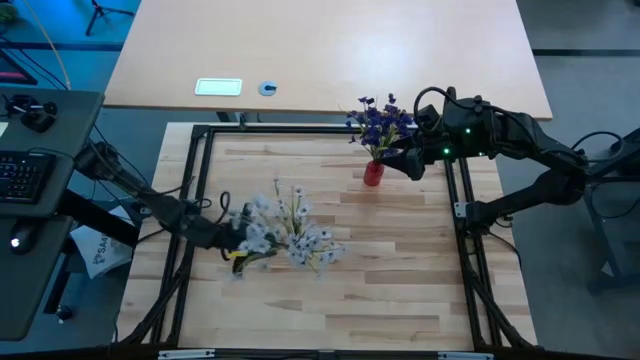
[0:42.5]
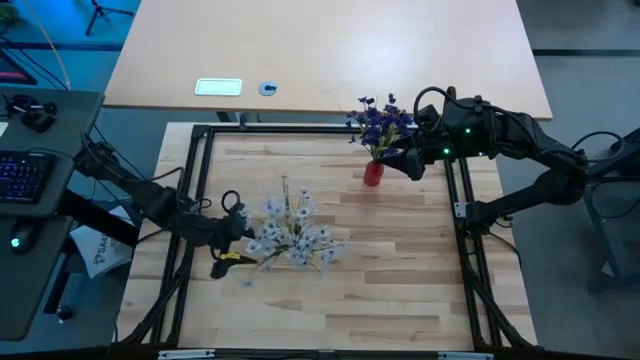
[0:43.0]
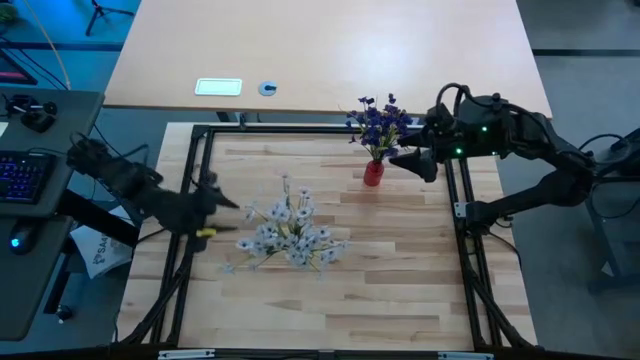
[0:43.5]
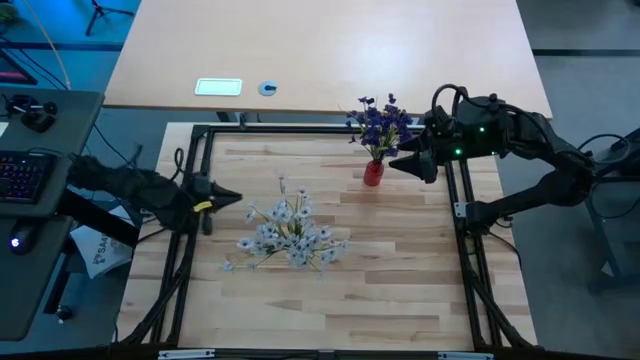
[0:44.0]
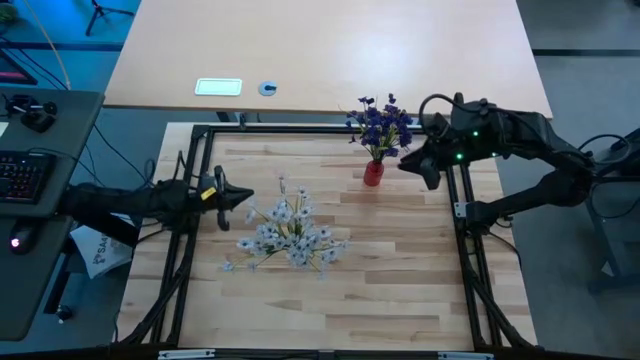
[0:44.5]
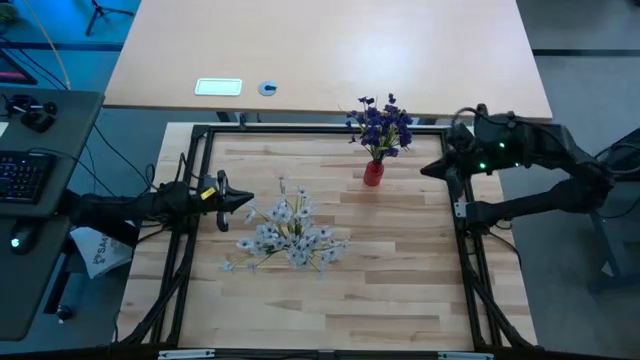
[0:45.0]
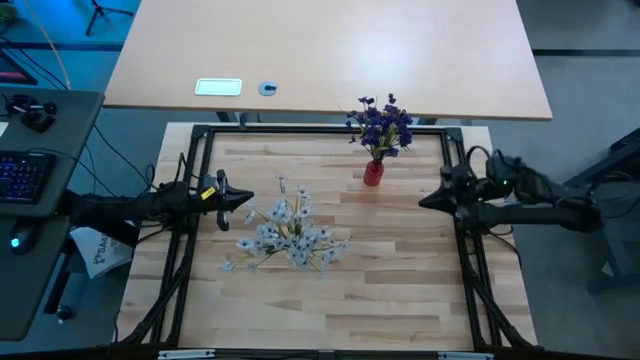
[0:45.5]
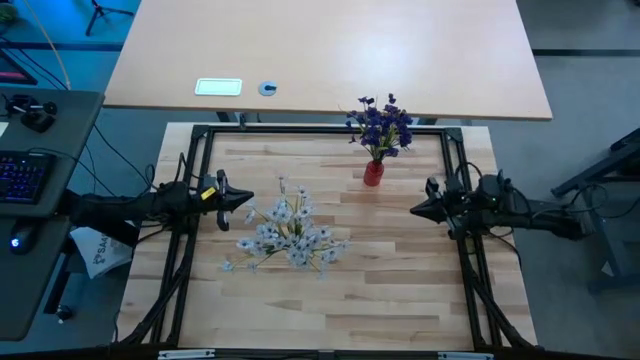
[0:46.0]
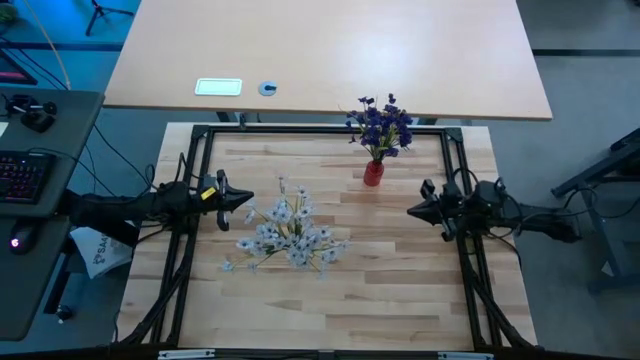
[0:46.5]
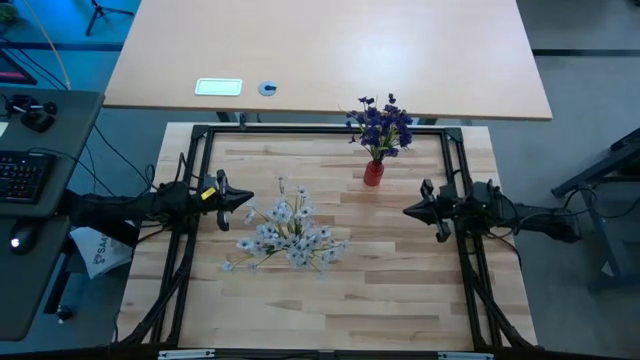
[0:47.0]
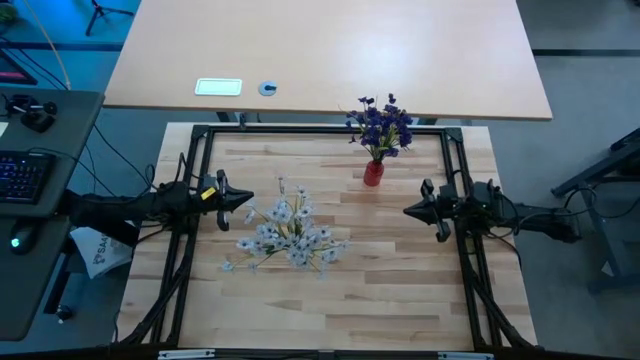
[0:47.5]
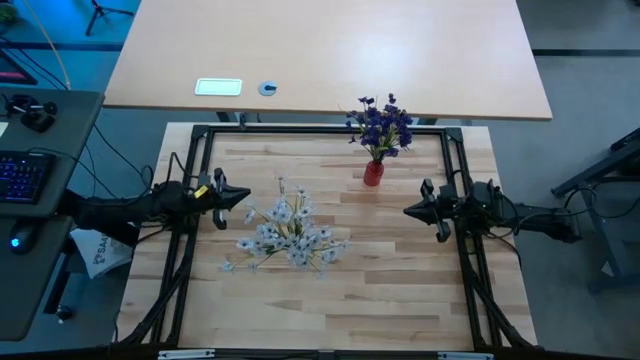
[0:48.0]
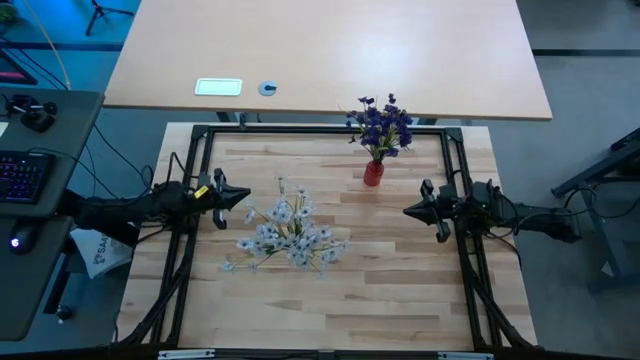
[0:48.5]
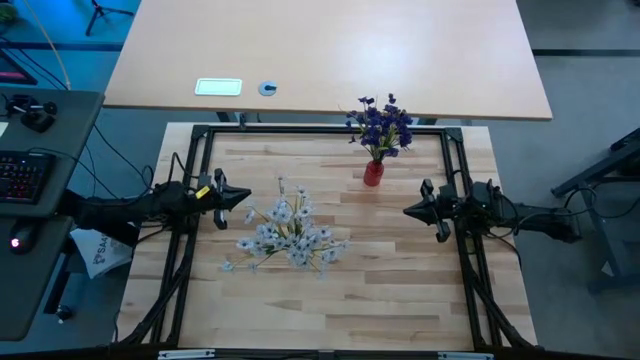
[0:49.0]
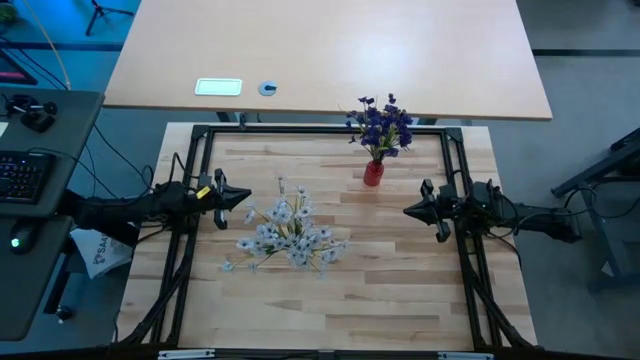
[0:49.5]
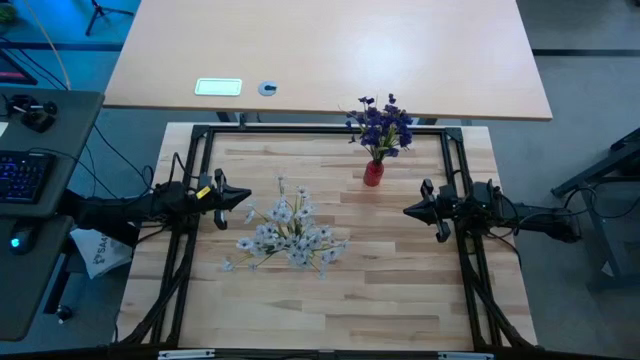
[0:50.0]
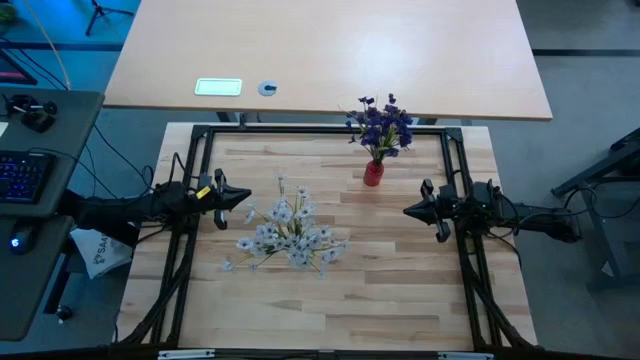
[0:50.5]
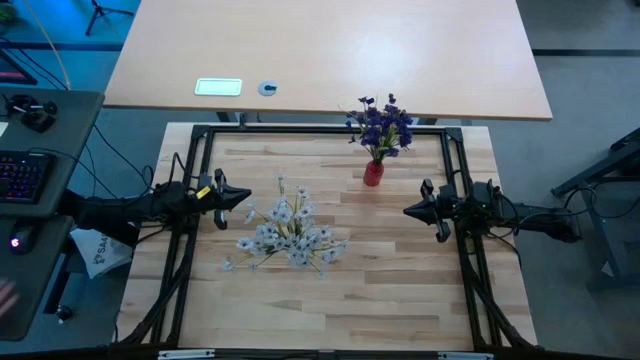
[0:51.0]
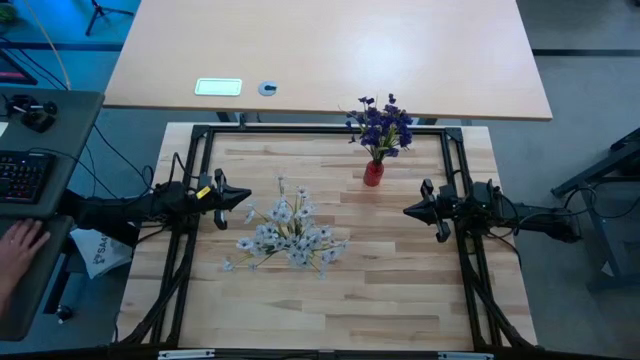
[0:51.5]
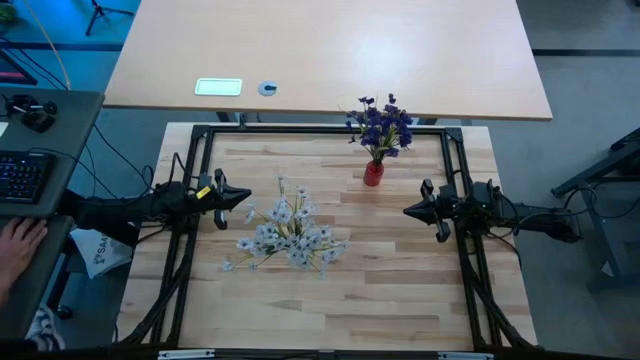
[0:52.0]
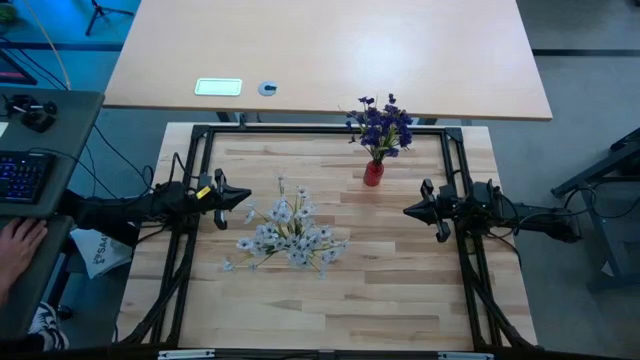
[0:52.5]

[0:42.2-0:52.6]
Task: Sort flowers into vase by color
Return to Home Position

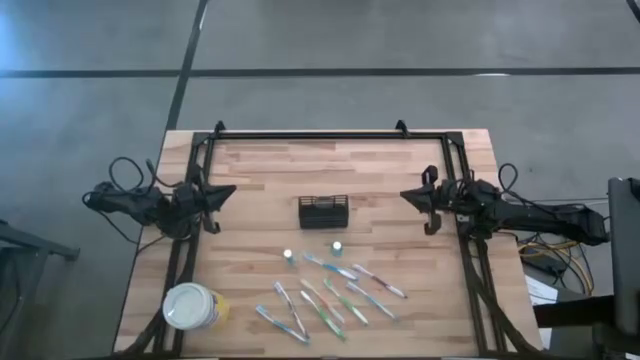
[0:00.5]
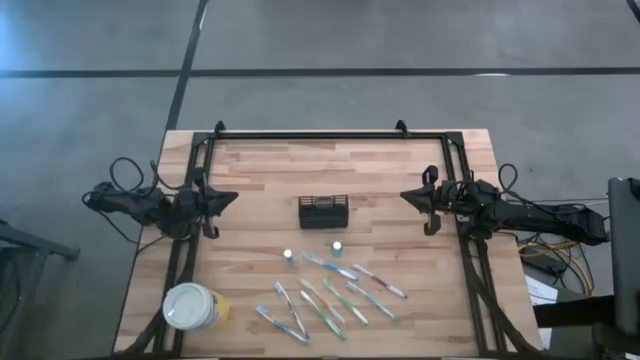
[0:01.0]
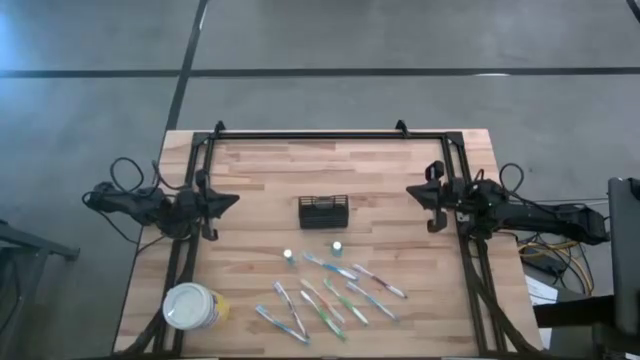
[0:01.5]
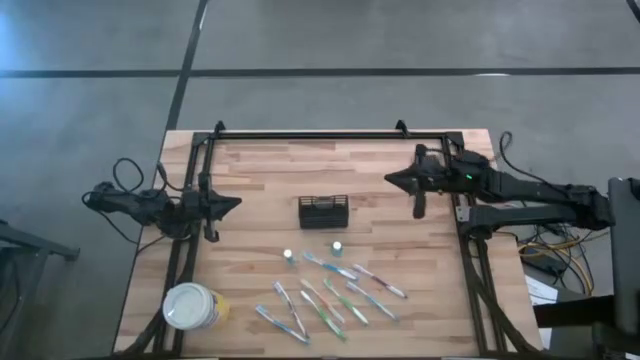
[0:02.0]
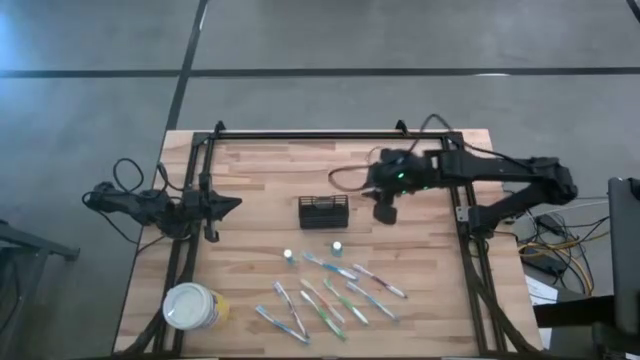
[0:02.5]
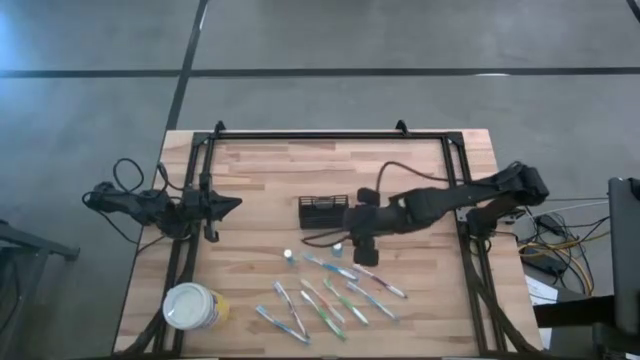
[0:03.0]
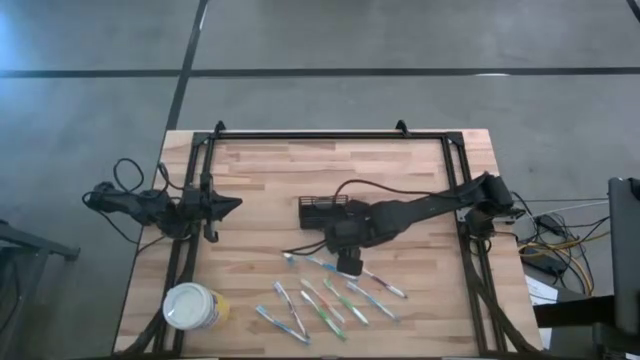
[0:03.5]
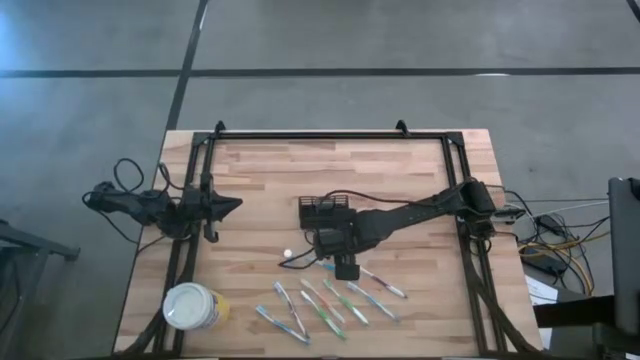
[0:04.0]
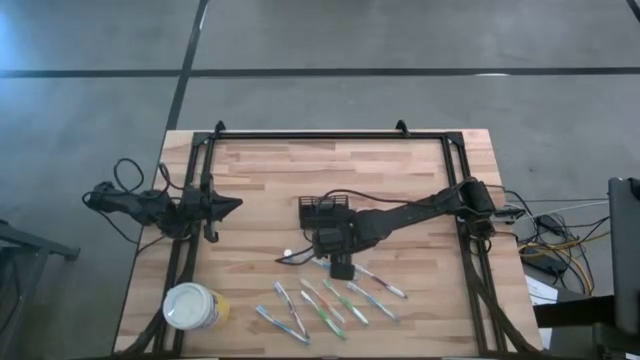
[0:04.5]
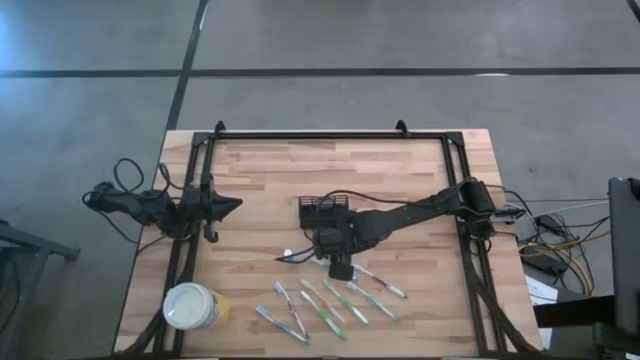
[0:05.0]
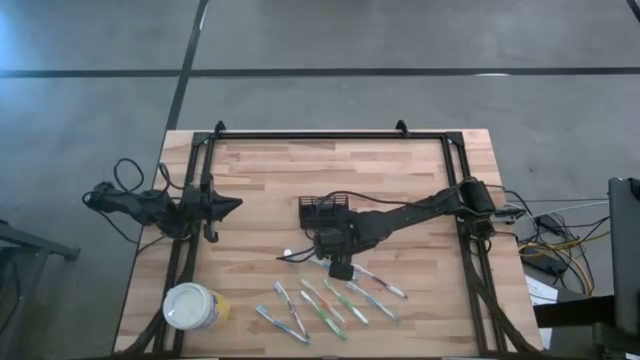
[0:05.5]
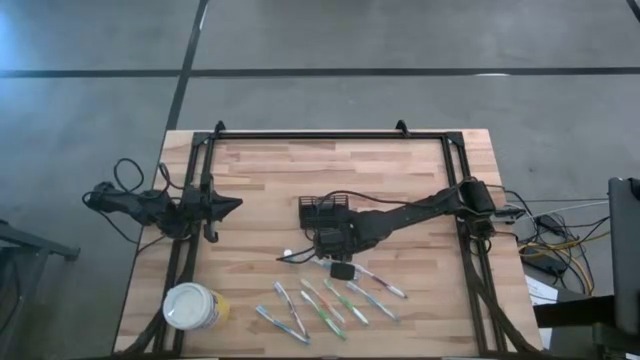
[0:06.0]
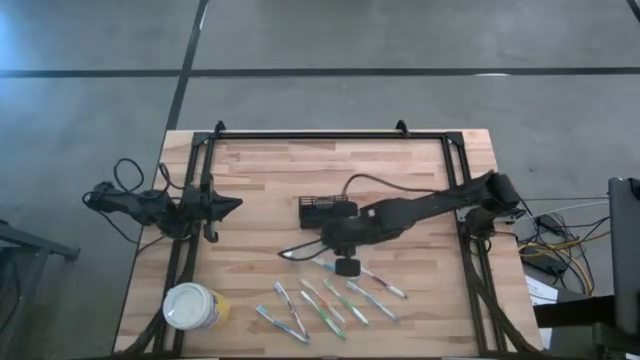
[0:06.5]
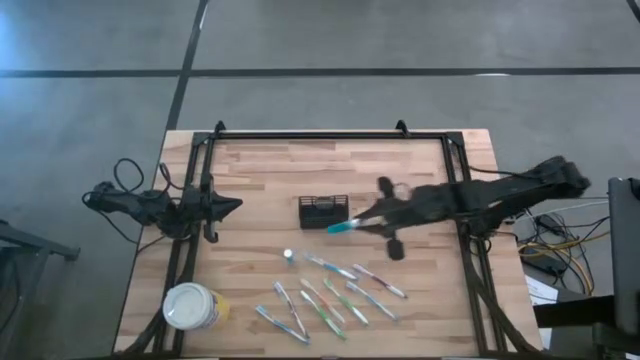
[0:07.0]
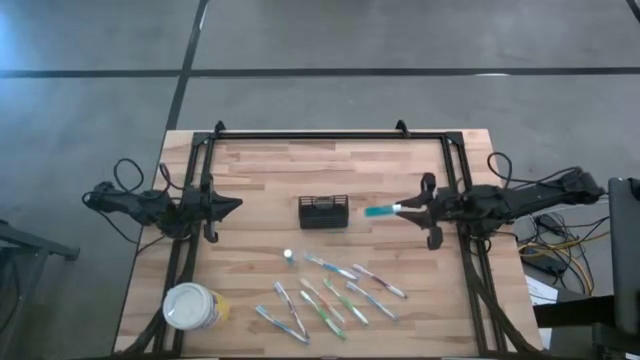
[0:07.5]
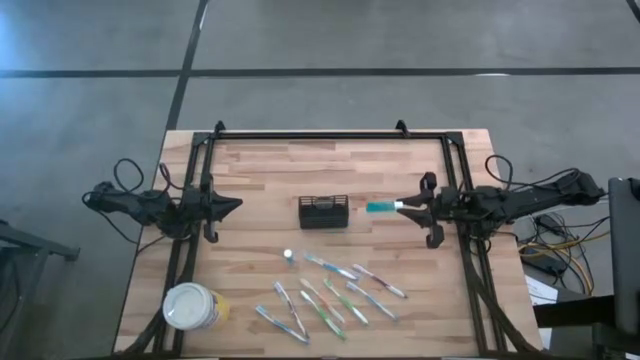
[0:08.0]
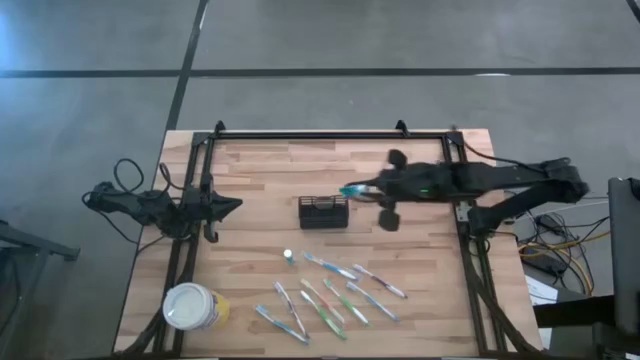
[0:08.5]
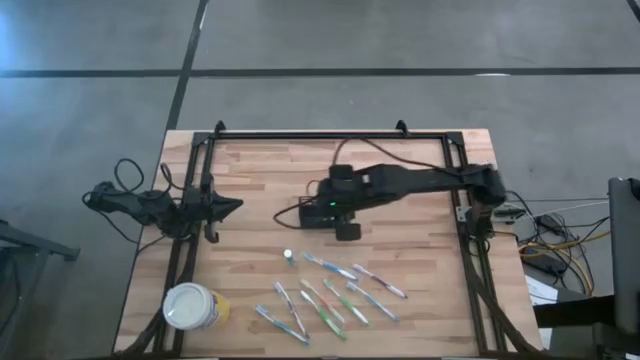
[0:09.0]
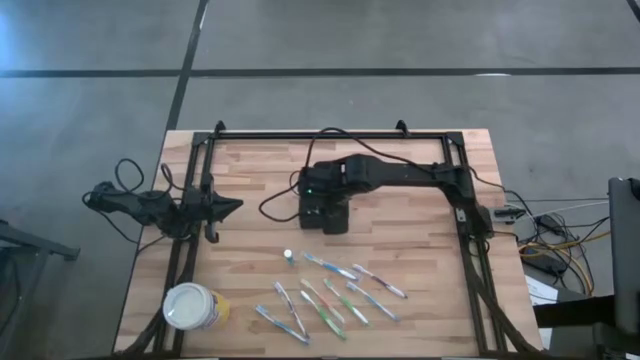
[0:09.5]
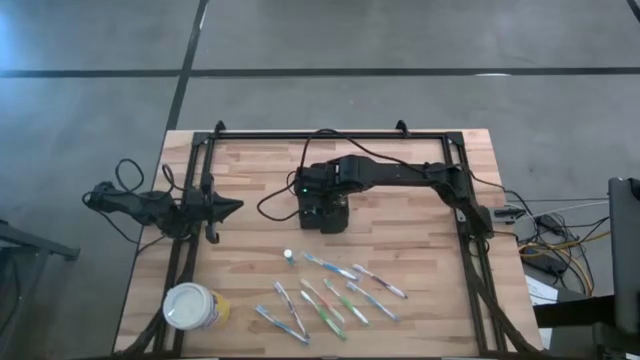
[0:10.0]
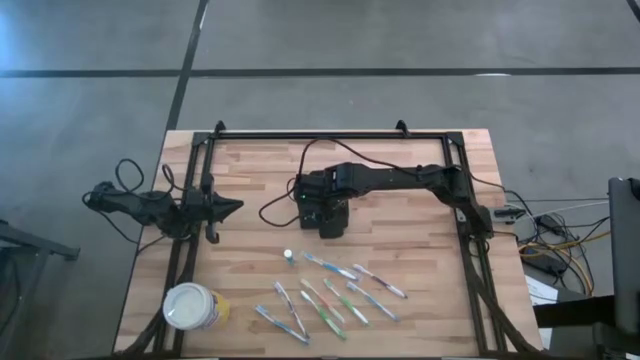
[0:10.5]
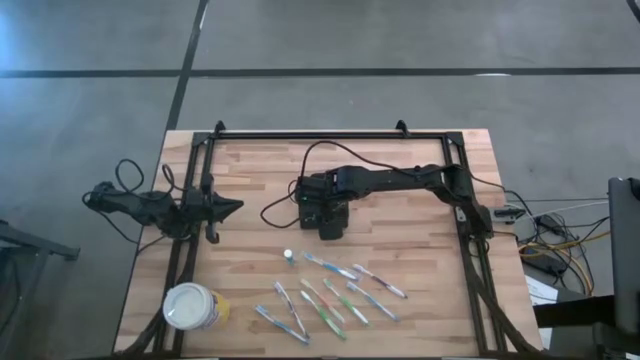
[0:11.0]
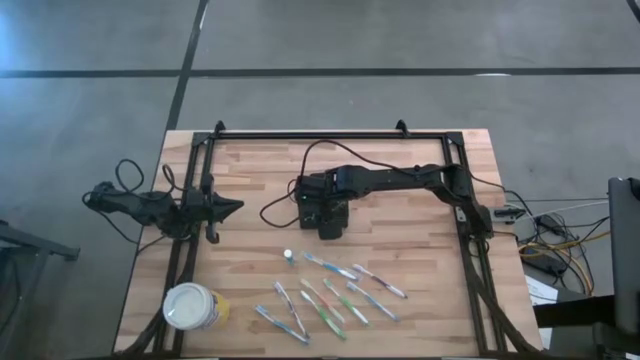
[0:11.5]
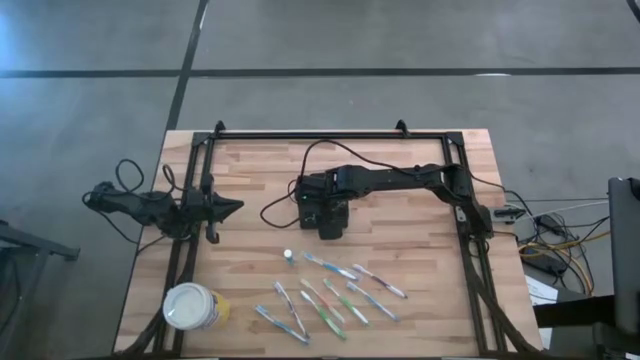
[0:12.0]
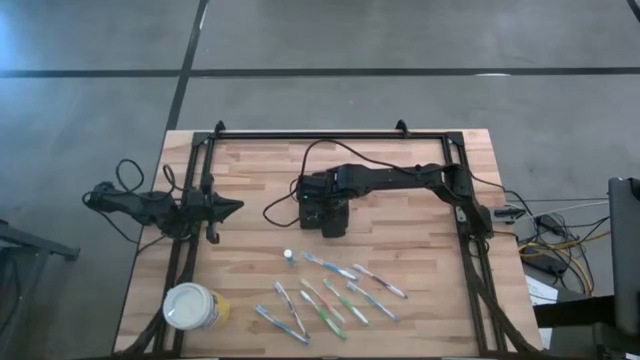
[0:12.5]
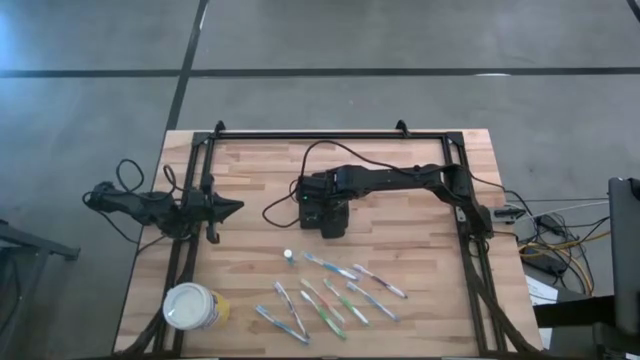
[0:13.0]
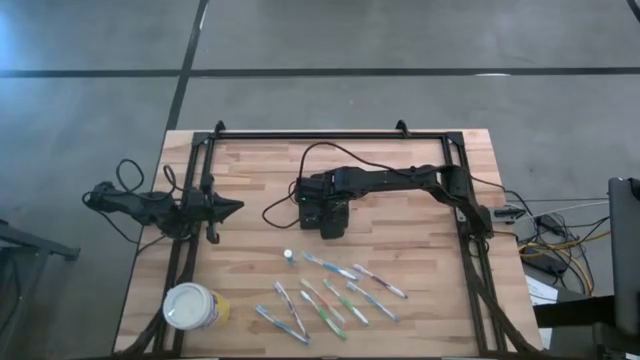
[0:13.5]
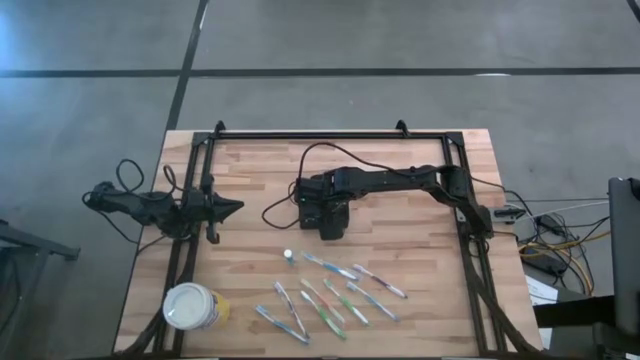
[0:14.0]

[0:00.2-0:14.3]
Task: Pick & Place toothbrushing station
Put the blue mouthwash into the black wire organizer
